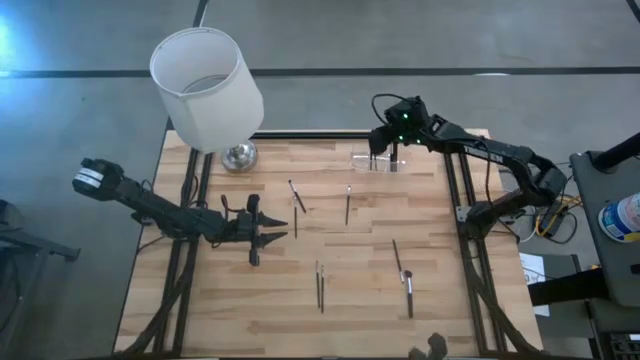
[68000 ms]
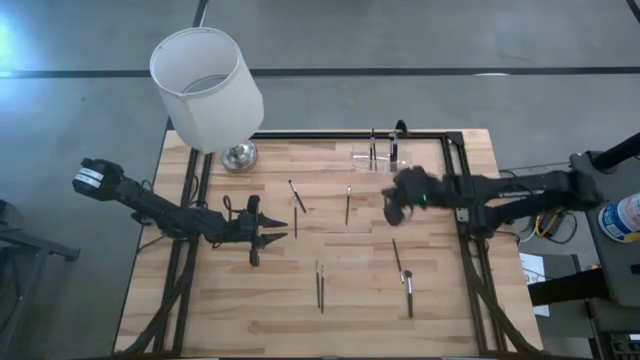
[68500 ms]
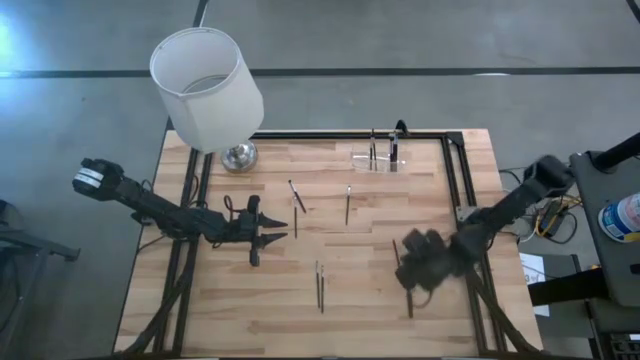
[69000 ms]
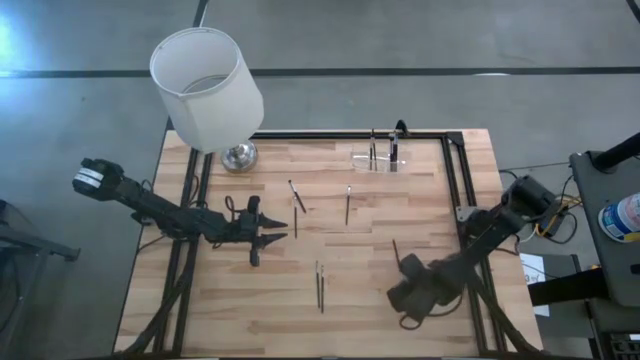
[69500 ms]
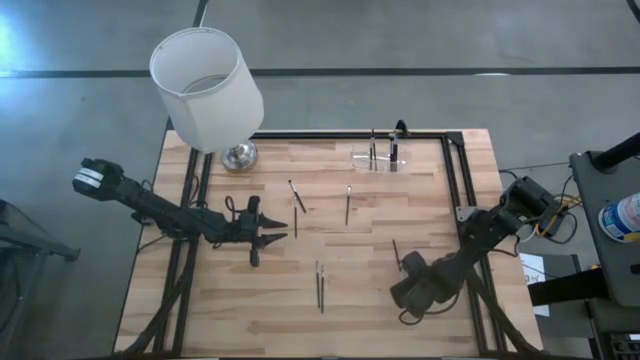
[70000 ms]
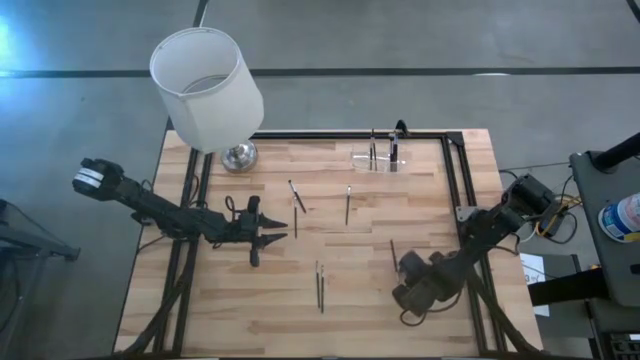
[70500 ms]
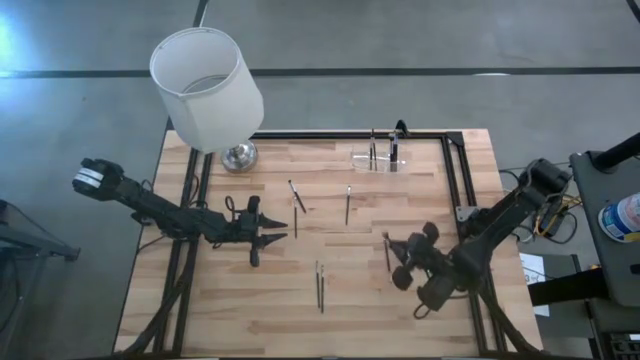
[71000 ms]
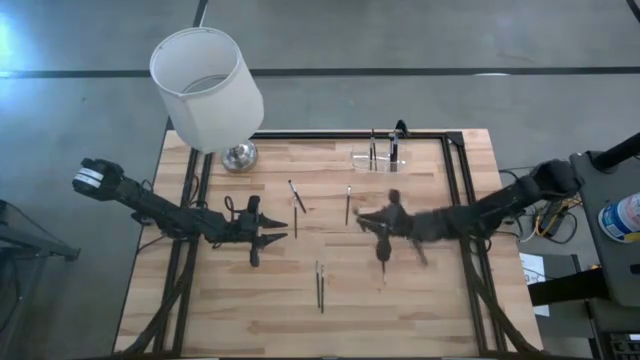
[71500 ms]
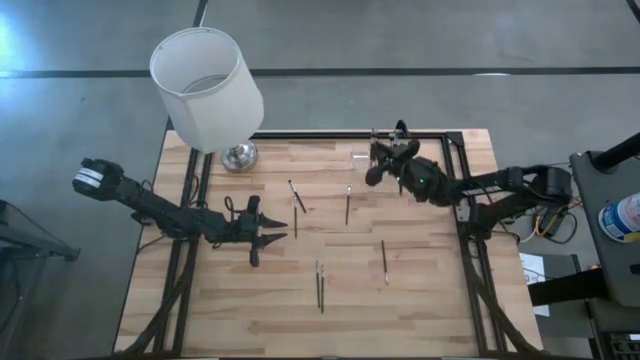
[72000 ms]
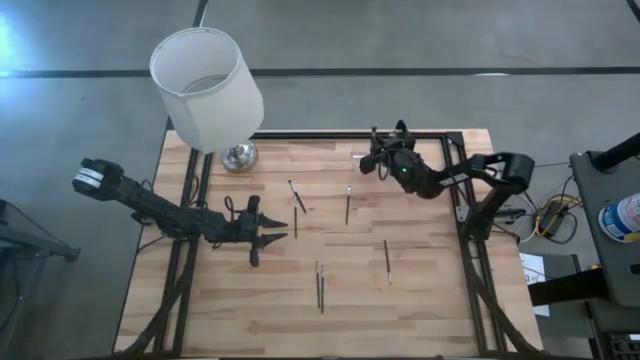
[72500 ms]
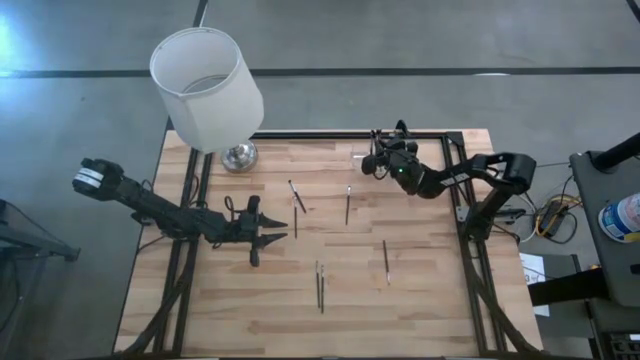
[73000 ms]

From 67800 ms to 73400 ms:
Task: Put items in baskets/containers
Put the foundation brush into the transparent organizer

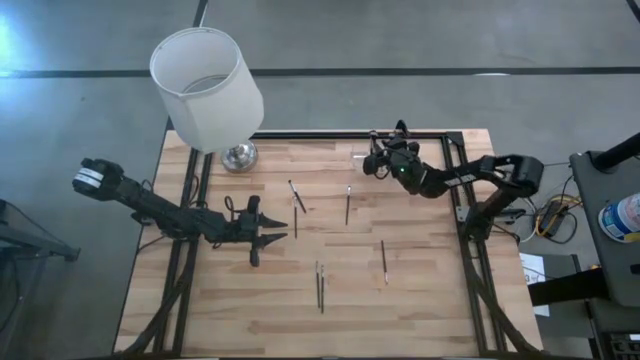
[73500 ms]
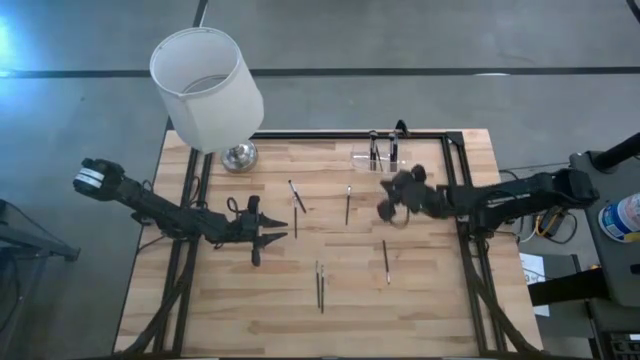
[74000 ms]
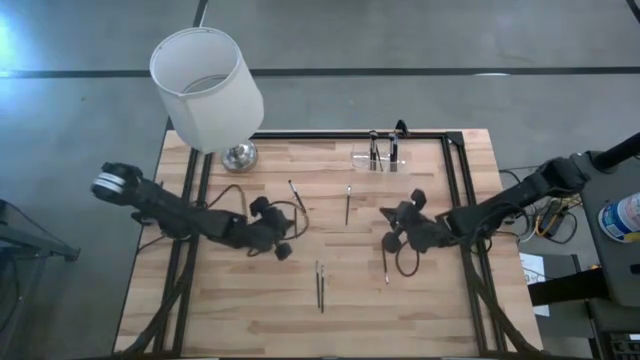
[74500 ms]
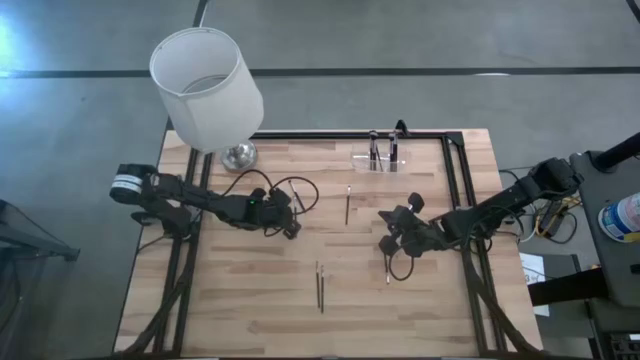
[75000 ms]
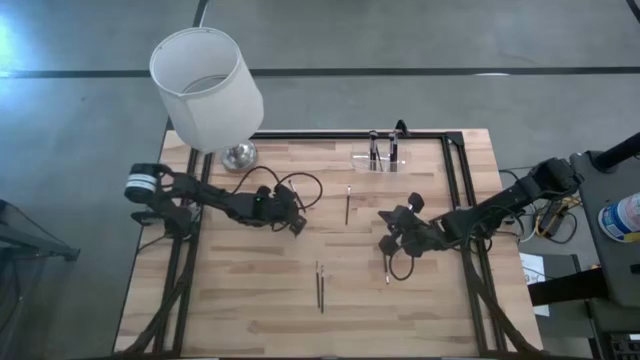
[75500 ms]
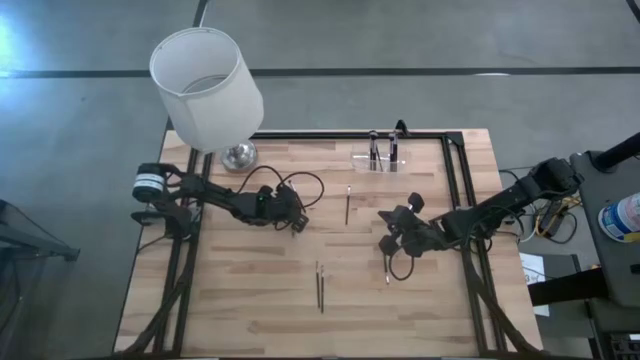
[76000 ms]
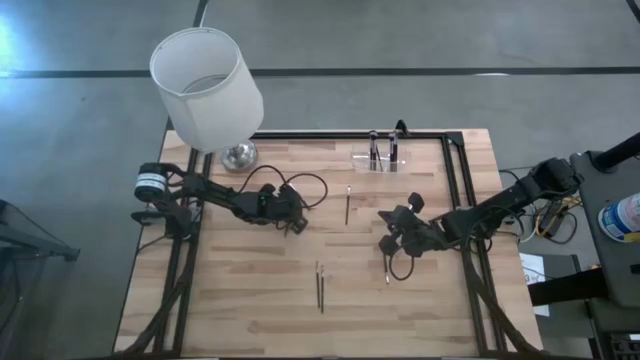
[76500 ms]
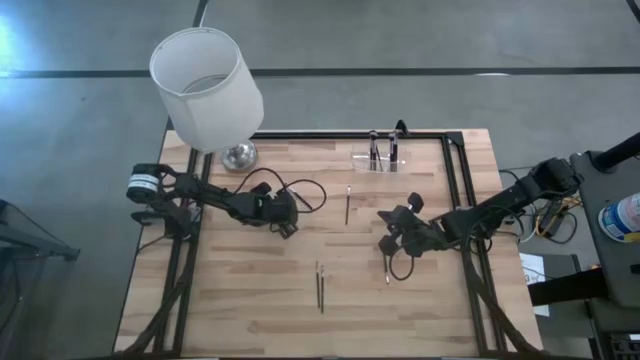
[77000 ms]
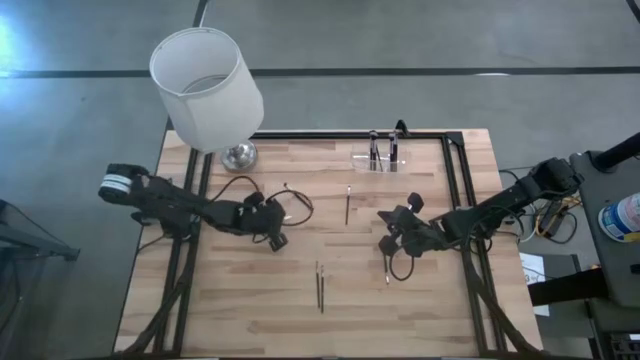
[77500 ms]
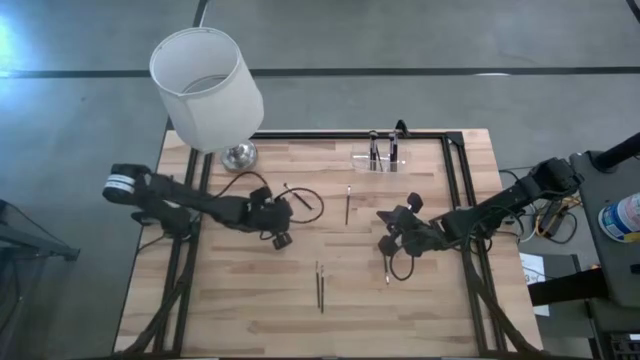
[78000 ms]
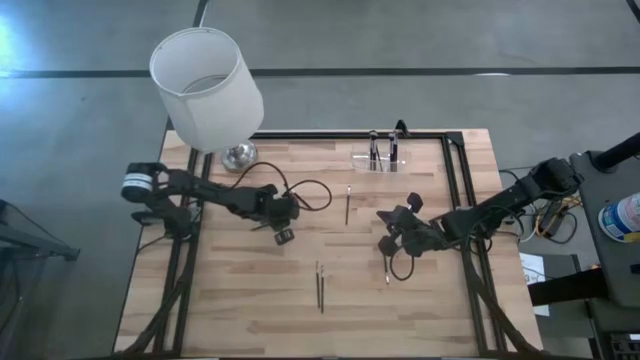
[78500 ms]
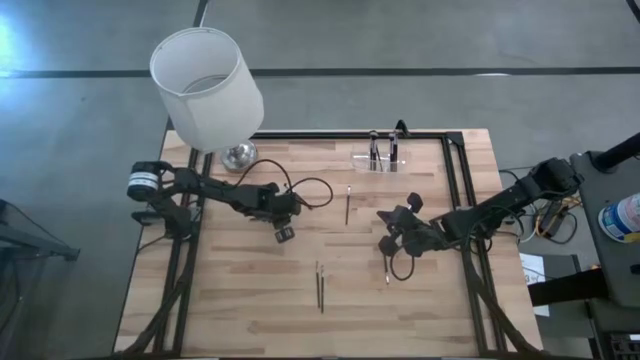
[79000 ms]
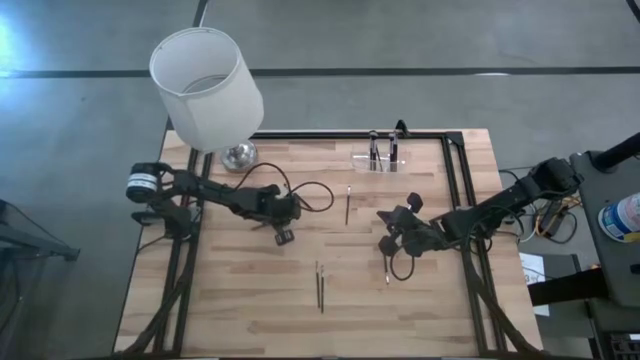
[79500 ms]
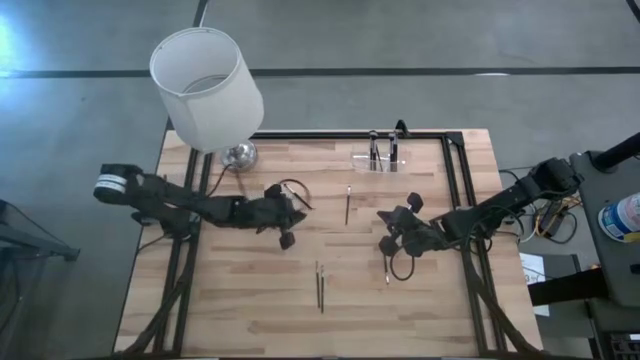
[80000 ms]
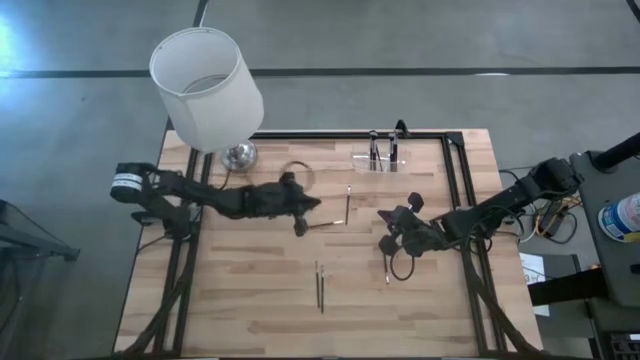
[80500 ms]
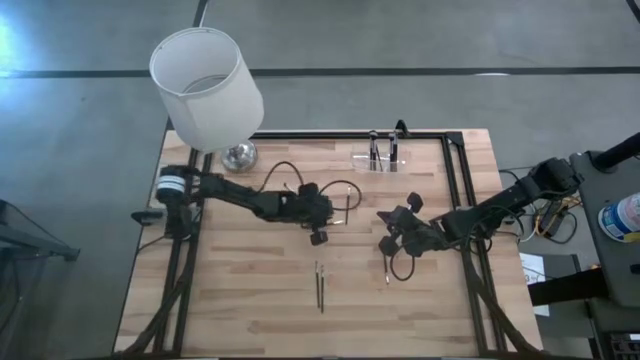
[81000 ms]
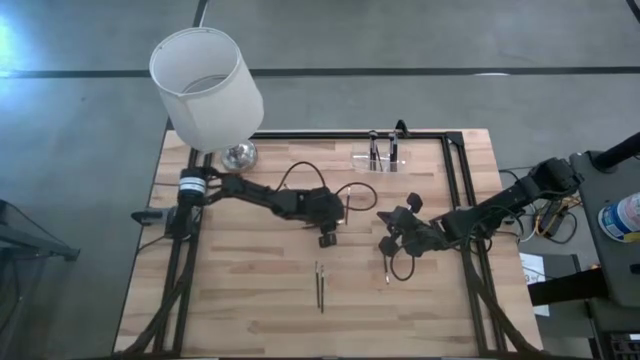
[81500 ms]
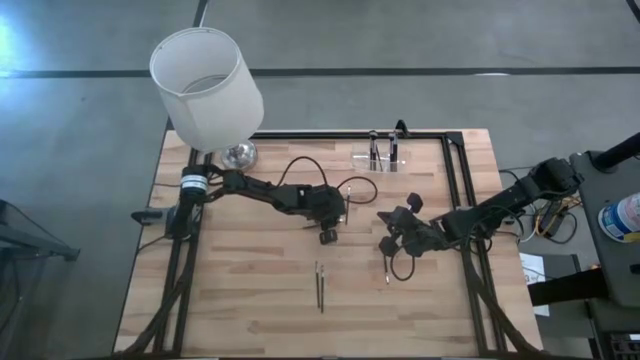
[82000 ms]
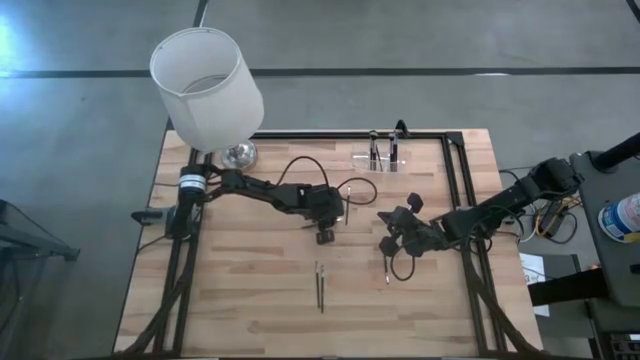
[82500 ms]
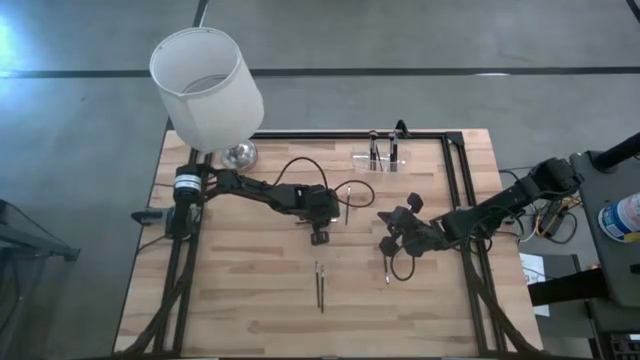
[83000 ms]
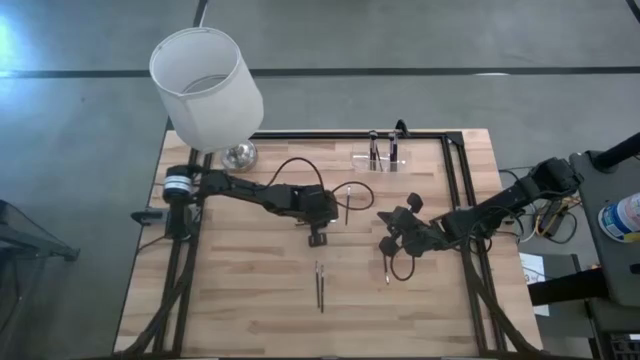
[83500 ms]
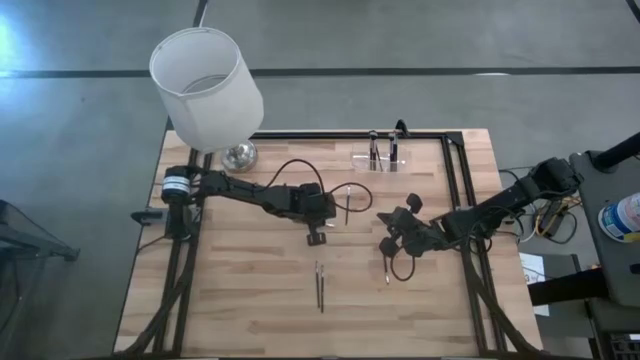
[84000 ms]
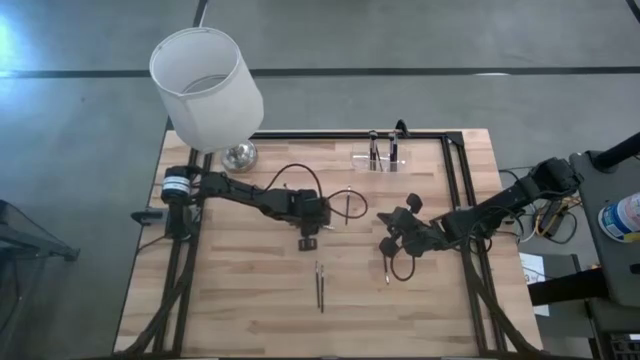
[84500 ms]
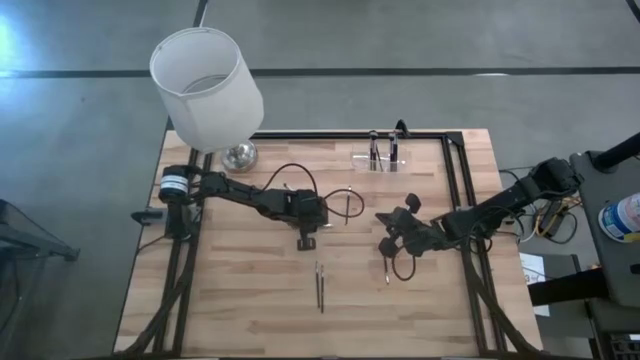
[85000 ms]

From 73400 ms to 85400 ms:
Put the eyeshadow brush into the transparent organizer

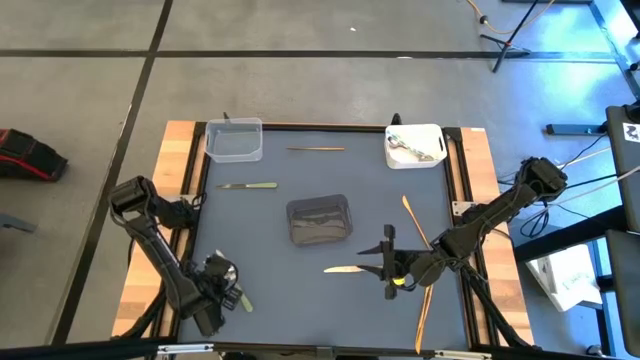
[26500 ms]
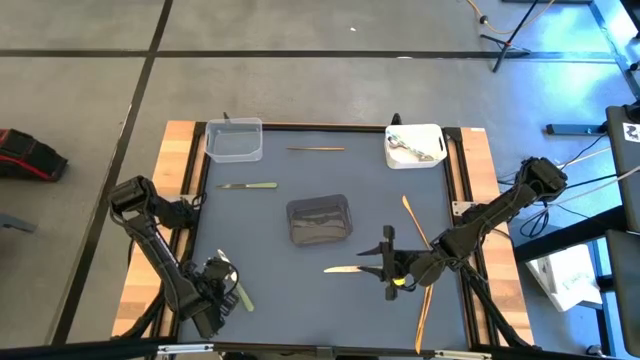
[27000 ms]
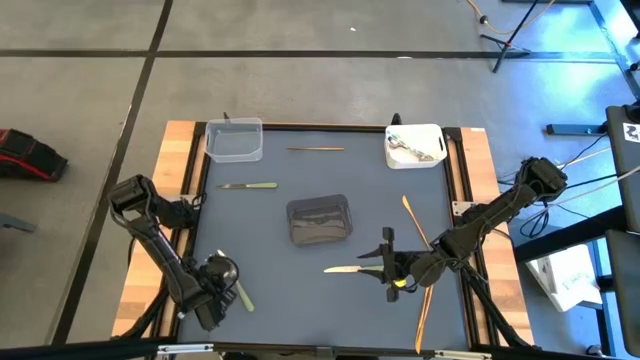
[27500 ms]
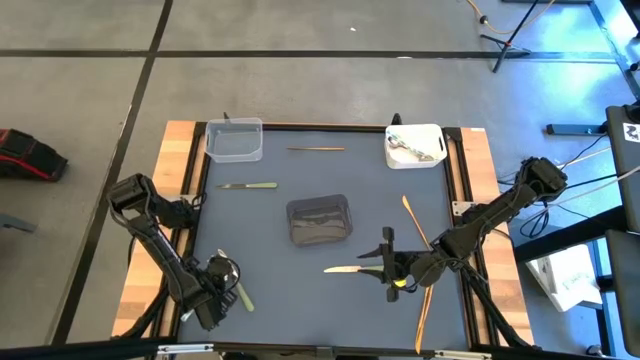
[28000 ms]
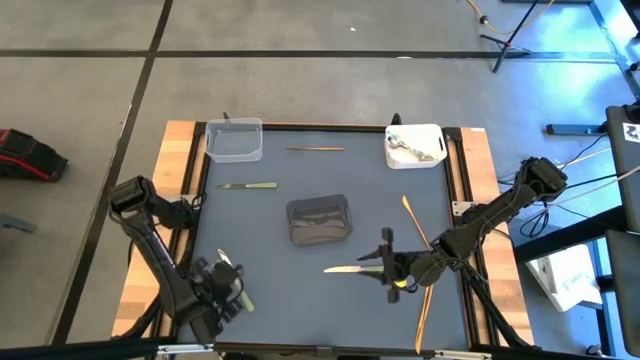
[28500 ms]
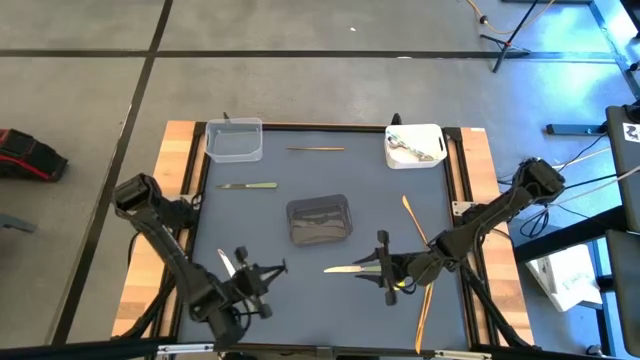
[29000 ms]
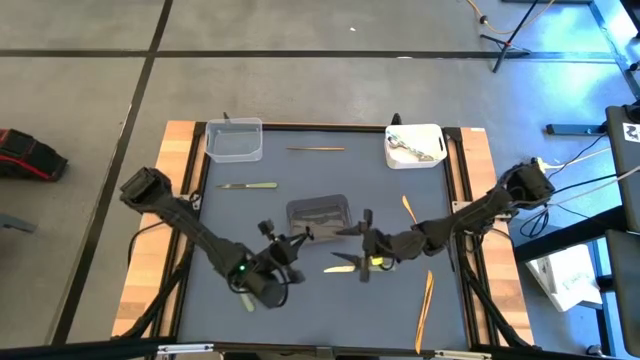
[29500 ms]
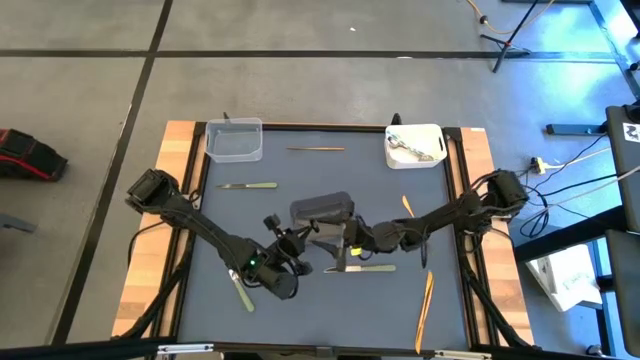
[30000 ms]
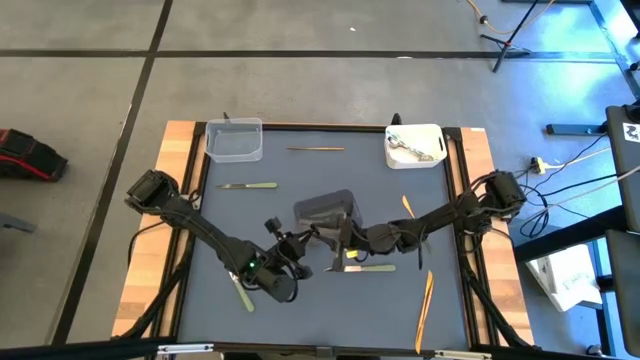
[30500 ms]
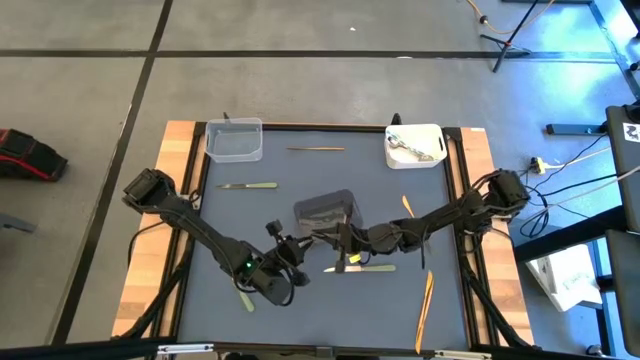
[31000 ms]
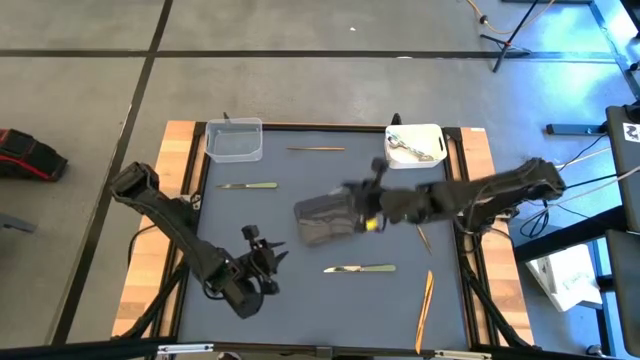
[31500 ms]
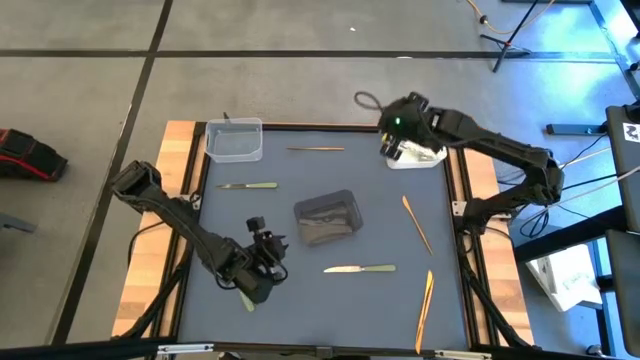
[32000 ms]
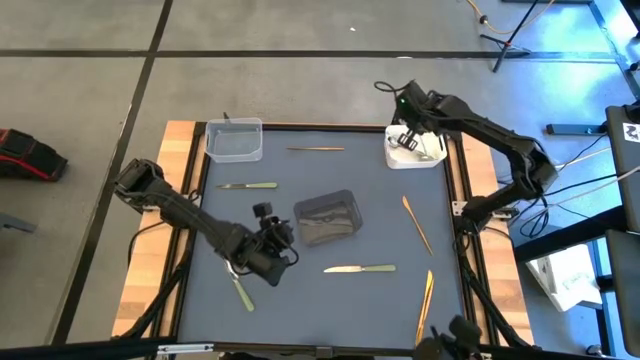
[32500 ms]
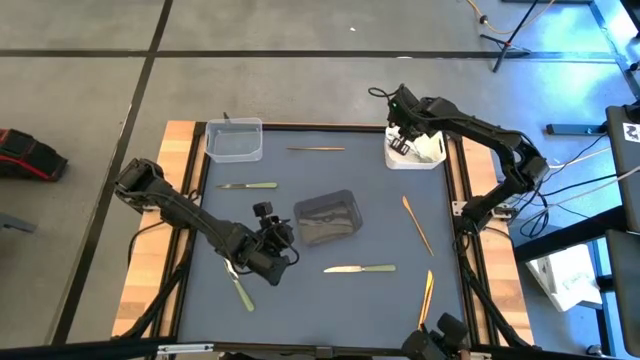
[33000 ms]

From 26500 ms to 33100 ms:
Task: Sort silverware by color (type)
Put the white green spoon into the white bin
